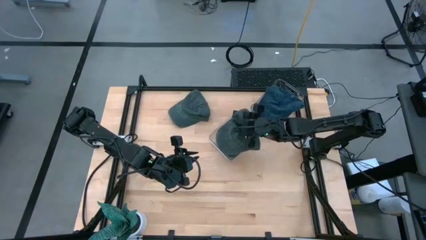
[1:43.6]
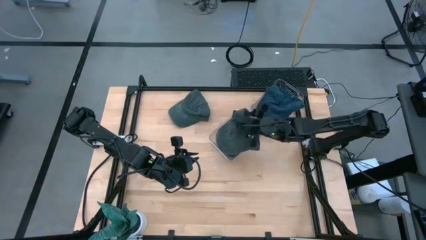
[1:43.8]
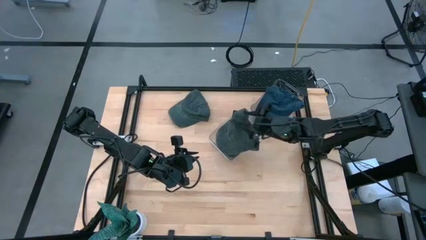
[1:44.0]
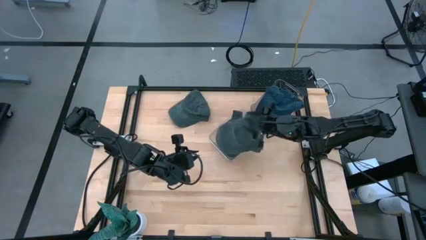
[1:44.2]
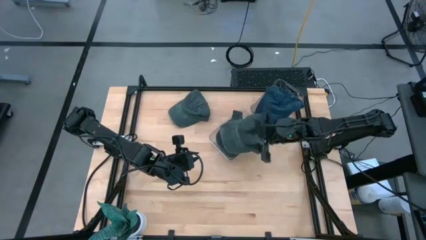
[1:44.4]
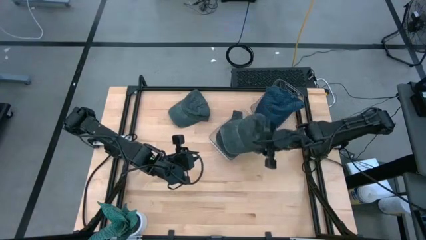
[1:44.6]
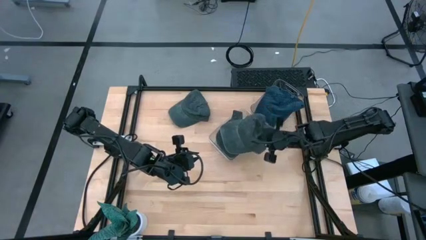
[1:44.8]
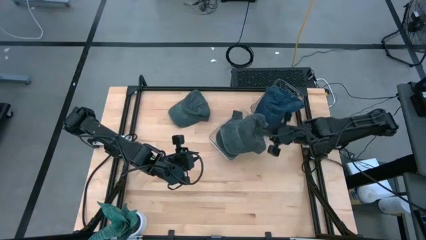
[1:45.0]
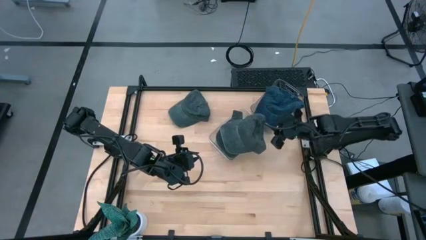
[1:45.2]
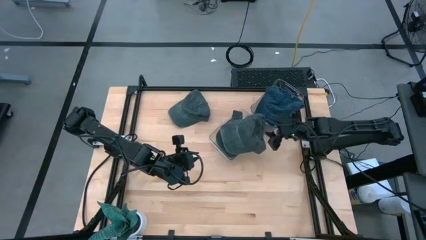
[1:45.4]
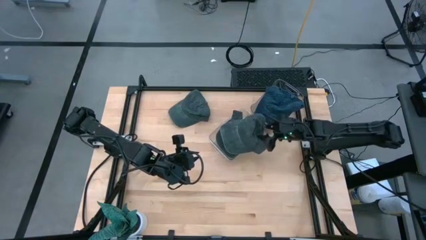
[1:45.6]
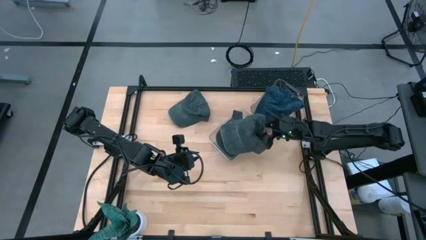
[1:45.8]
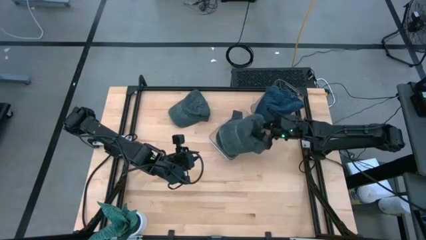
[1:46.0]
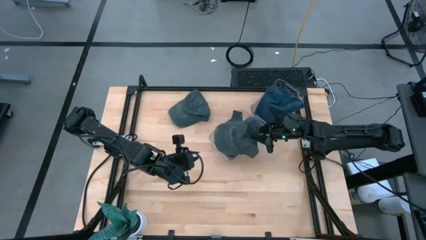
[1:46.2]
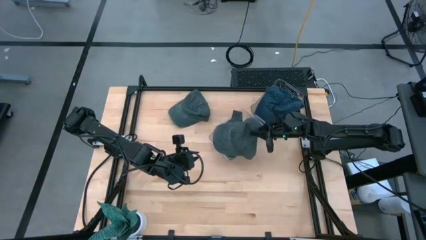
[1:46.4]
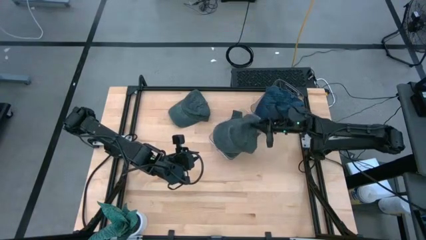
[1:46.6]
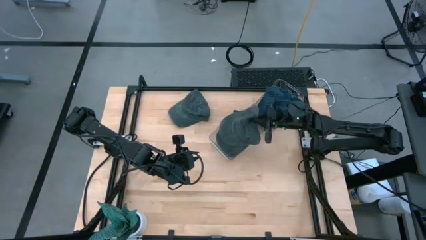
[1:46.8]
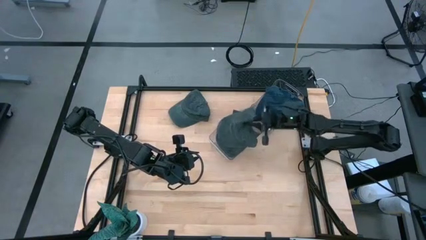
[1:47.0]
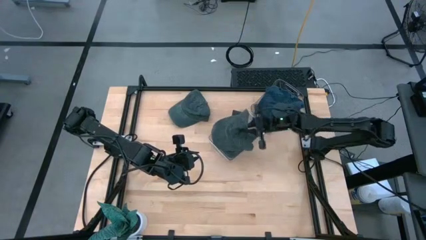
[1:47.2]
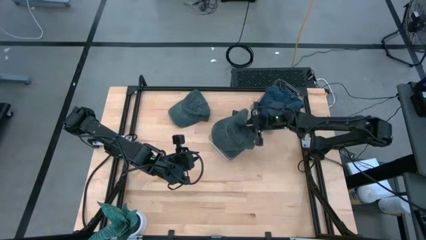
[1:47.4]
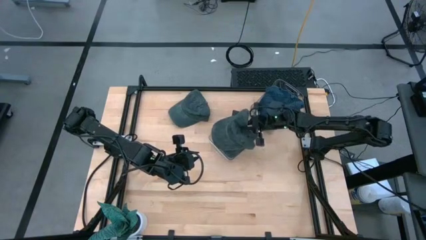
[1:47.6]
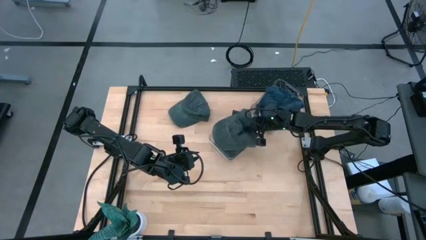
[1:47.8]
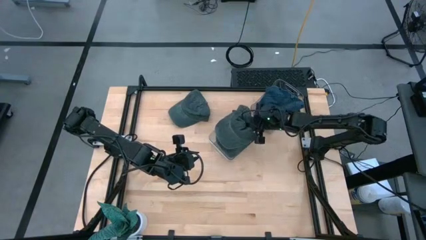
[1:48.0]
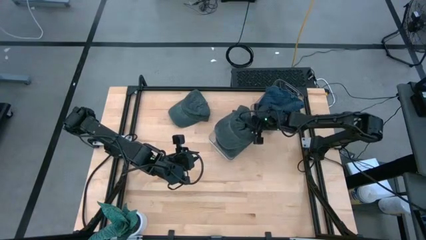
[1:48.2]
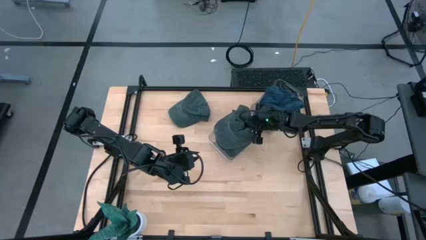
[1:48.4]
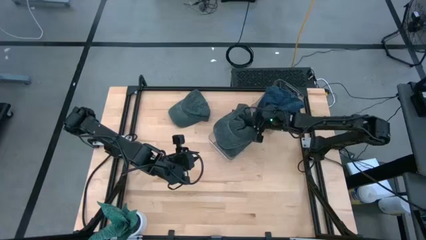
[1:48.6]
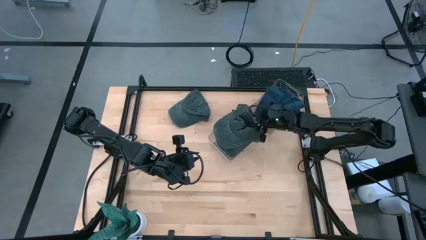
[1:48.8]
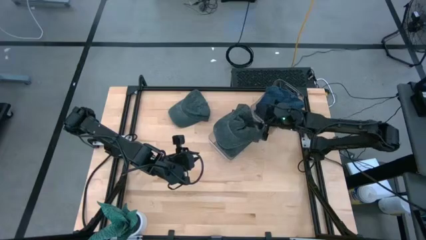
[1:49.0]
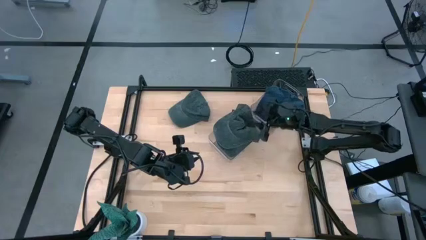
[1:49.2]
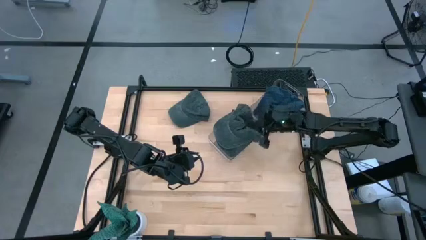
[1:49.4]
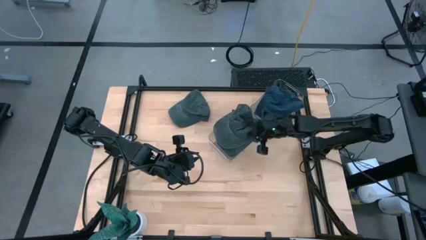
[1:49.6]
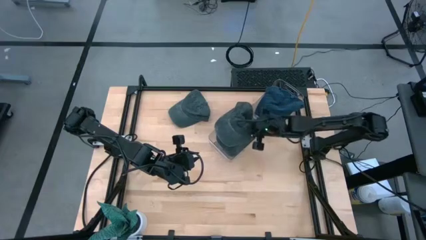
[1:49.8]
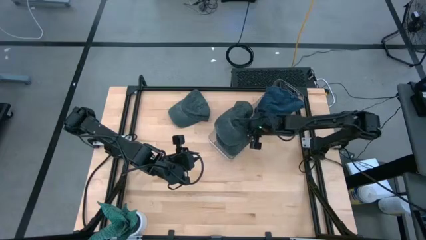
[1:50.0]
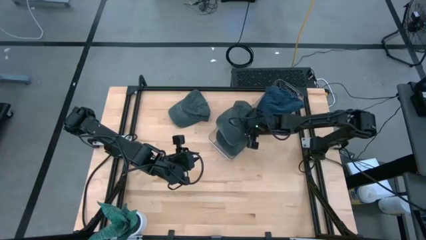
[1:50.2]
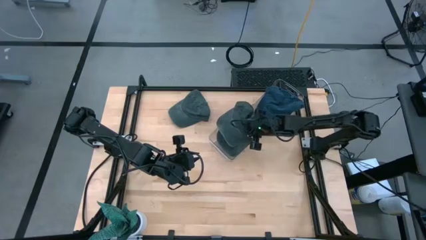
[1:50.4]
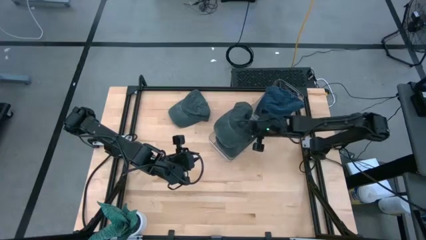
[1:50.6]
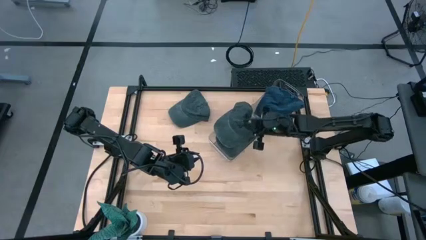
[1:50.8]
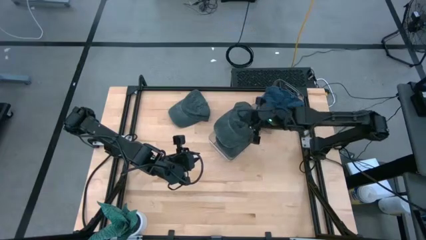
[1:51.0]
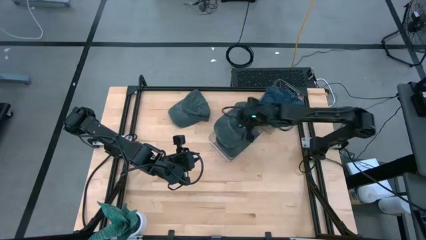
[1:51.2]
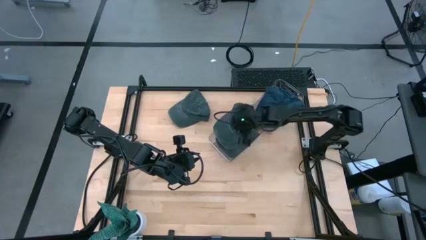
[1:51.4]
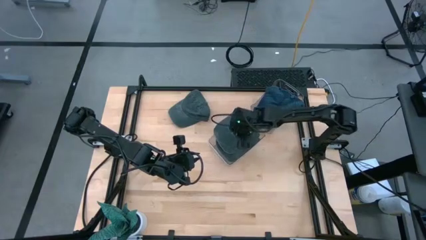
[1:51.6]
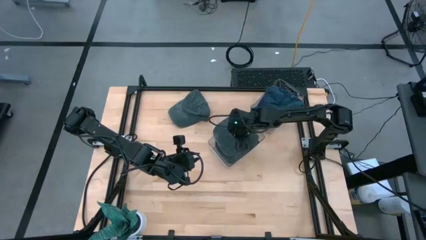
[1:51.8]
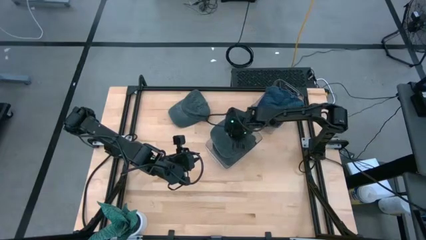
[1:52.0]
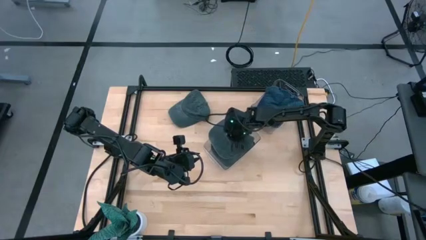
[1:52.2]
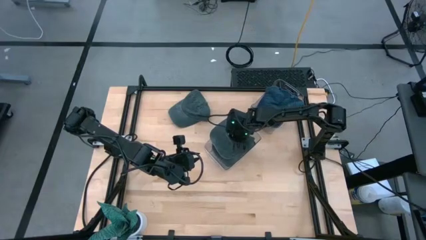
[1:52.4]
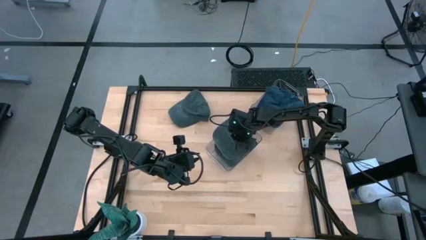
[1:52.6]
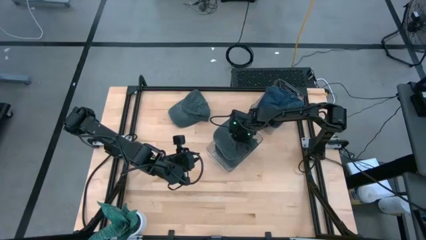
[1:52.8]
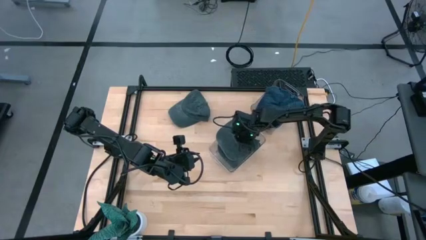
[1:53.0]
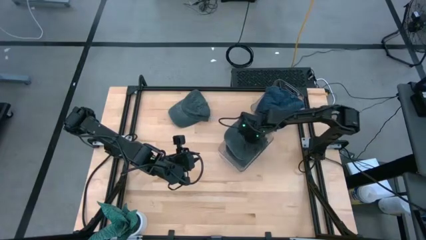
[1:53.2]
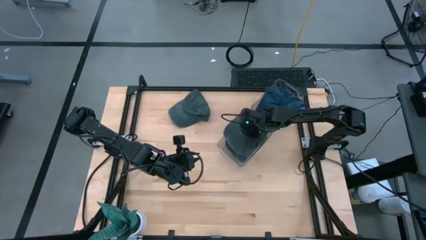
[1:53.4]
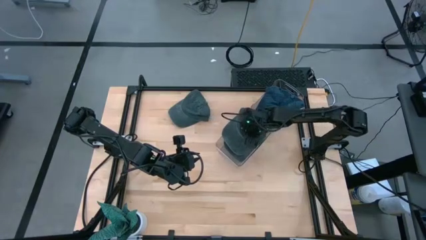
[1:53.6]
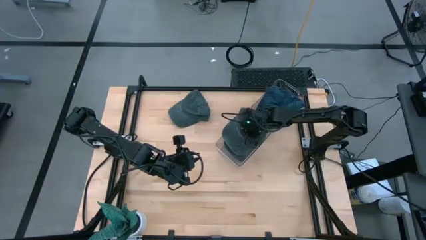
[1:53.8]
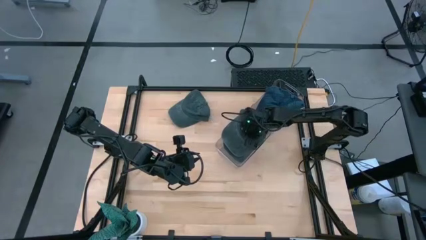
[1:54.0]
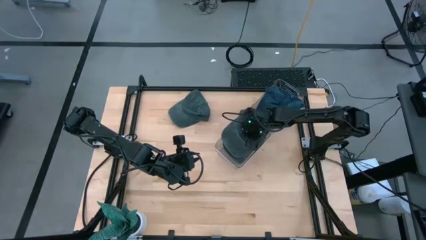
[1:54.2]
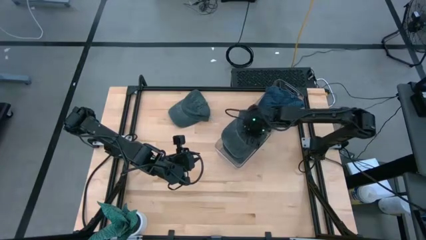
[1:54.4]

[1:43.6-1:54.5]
Task: Pick & Place hat
Put the bottom gray cap into the bottom transparent bin

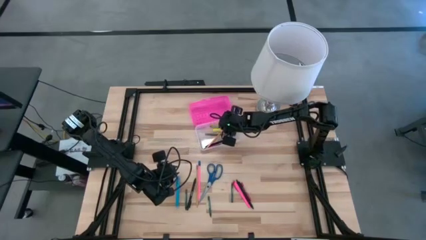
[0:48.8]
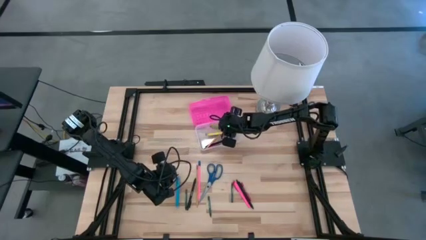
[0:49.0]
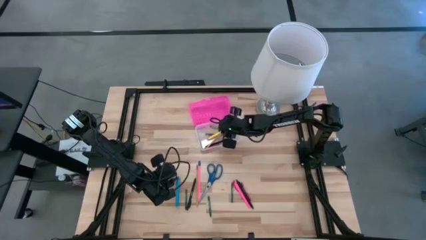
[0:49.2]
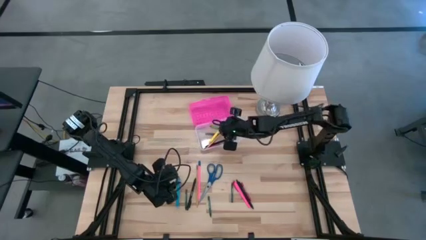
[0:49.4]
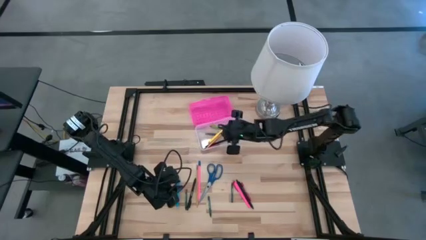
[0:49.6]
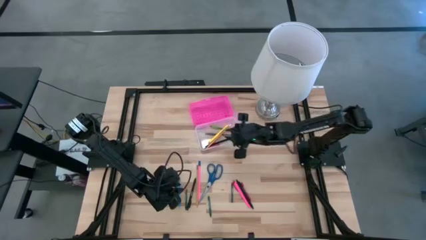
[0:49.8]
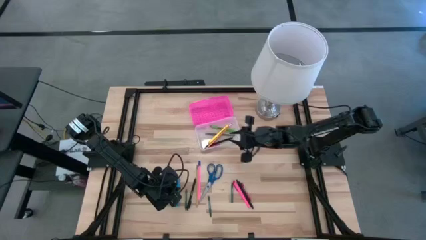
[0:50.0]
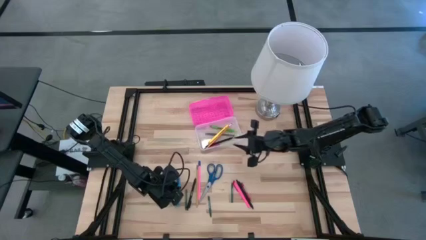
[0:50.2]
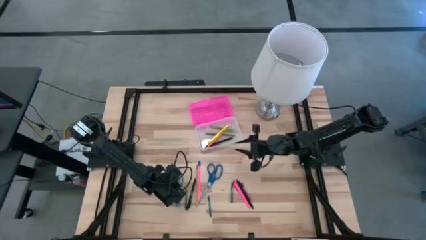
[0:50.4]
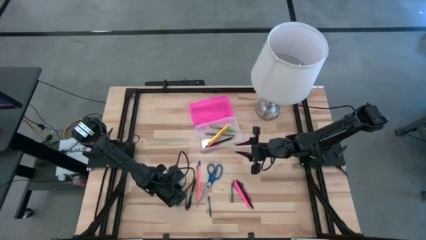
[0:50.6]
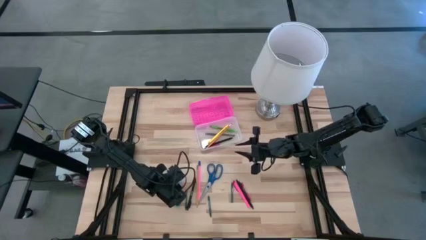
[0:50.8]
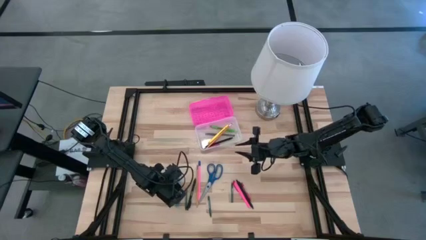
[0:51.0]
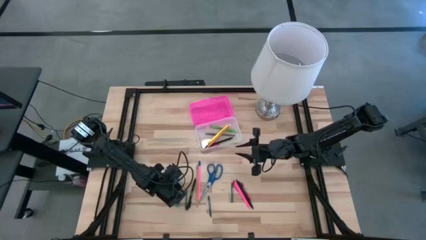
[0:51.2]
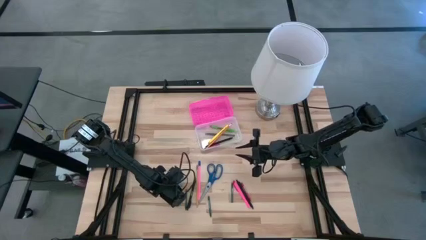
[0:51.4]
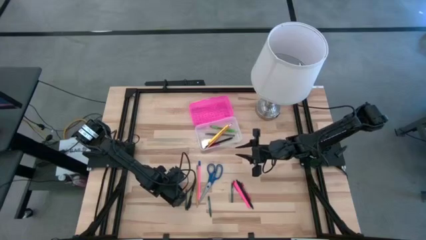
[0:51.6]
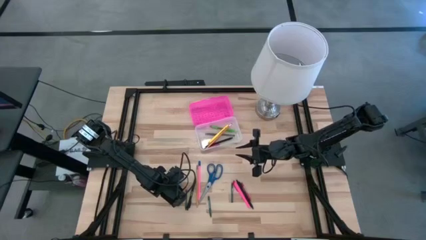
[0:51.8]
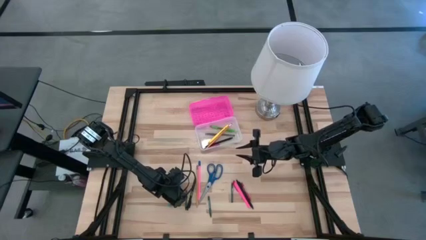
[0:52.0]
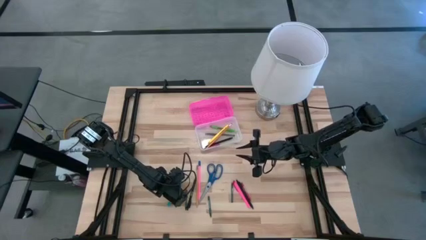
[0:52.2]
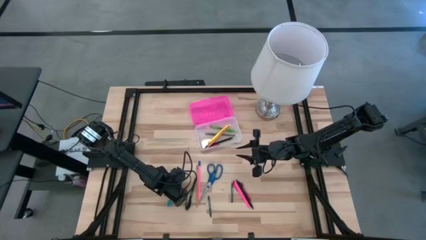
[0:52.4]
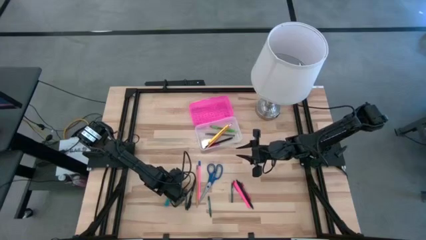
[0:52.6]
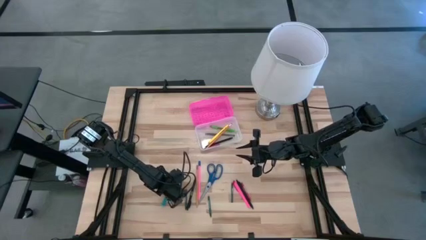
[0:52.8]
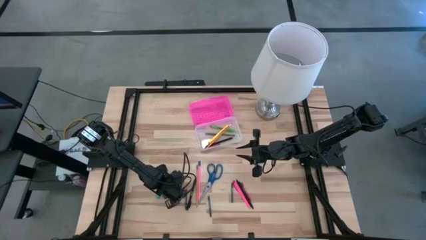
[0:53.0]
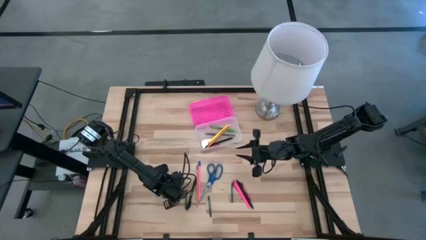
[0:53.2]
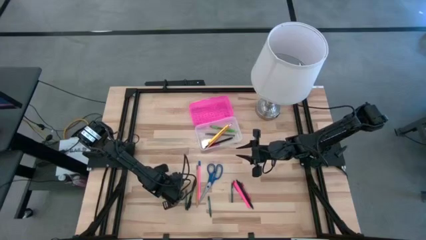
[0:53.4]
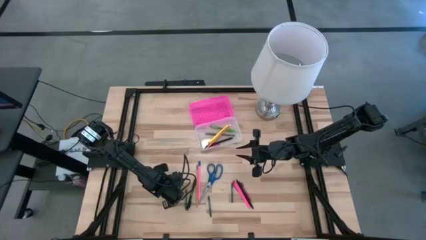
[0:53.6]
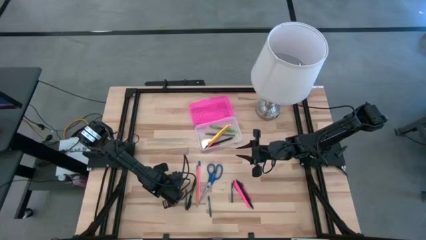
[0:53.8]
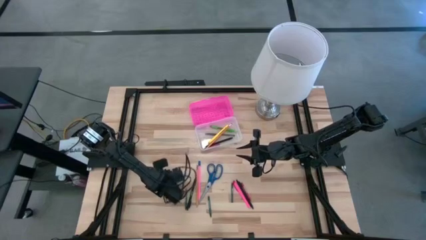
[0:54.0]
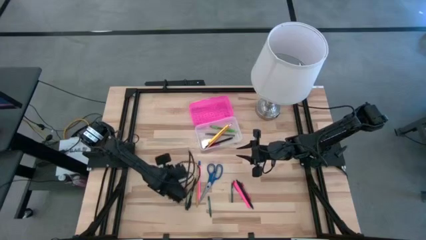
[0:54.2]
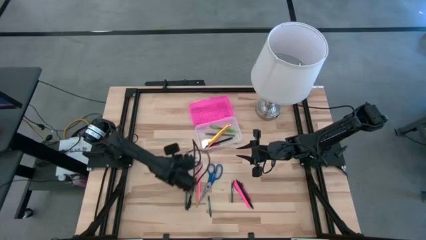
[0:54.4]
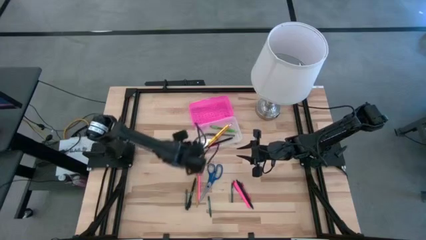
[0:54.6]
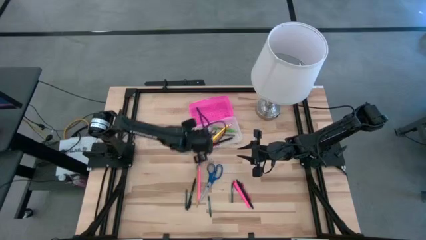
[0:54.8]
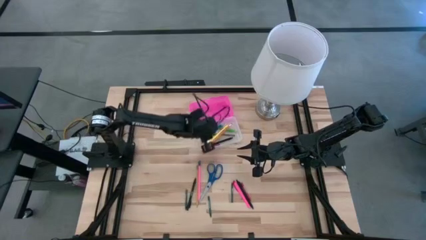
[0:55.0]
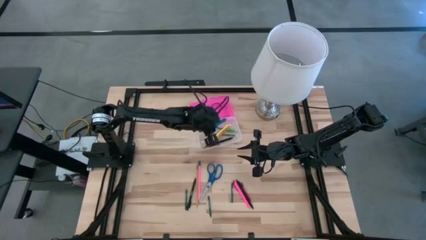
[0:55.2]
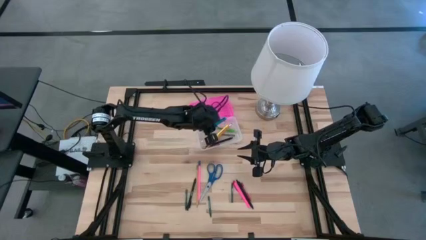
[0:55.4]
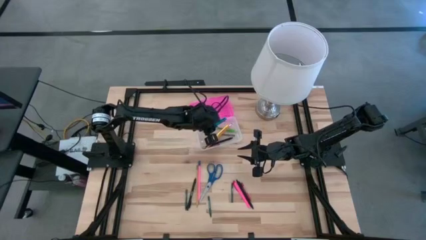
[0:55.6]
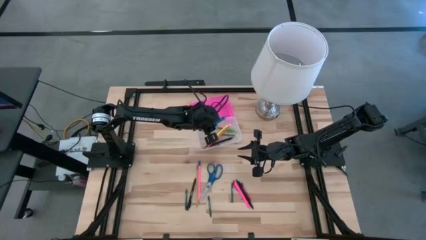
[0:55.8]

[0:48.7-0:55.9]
Task: Pick & place school supplies into a supply box
Put the blue pen into the pink supply box
